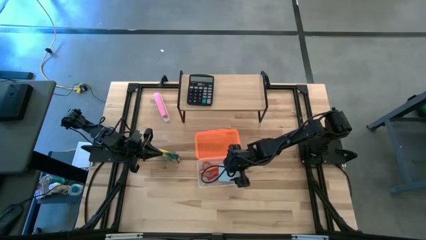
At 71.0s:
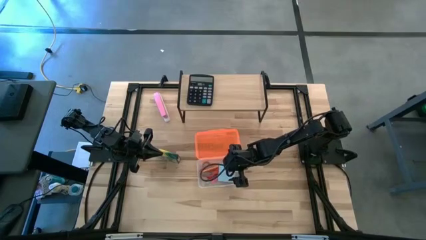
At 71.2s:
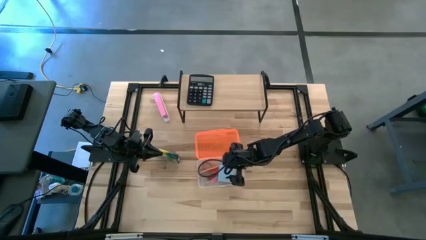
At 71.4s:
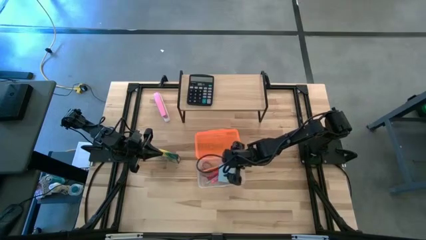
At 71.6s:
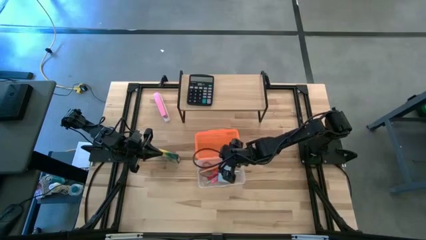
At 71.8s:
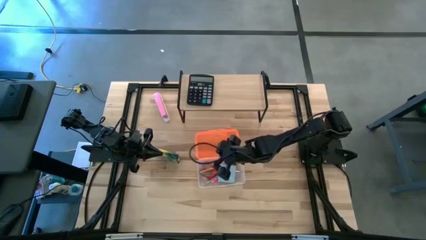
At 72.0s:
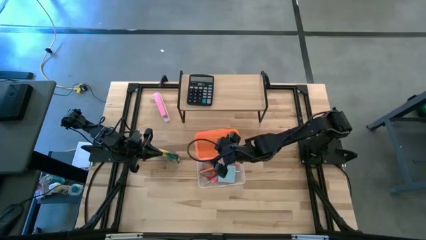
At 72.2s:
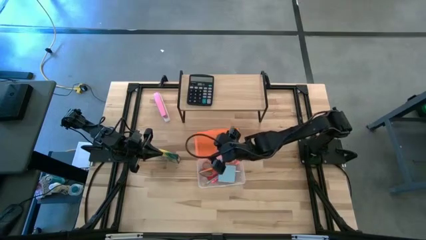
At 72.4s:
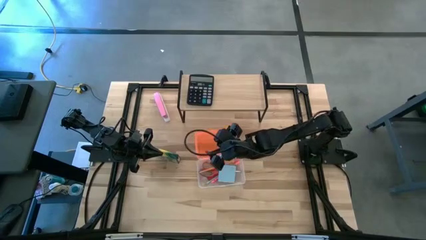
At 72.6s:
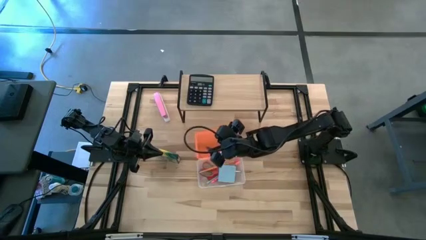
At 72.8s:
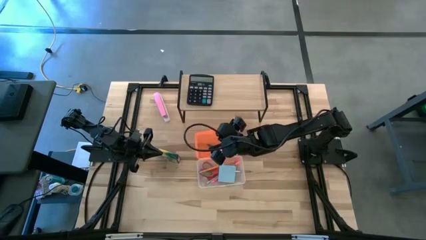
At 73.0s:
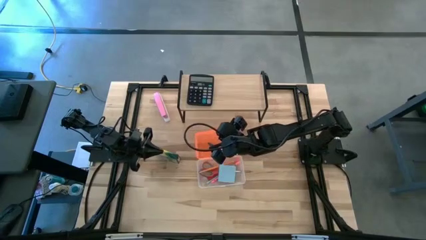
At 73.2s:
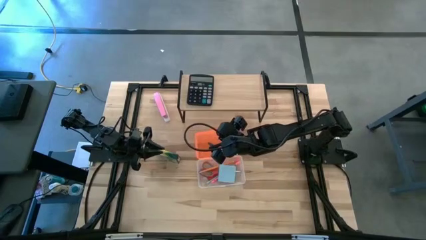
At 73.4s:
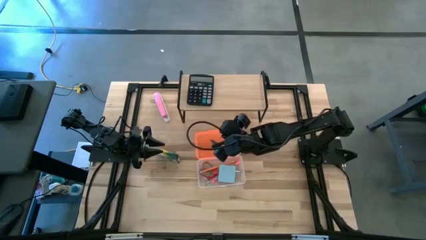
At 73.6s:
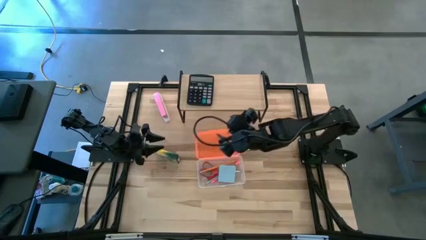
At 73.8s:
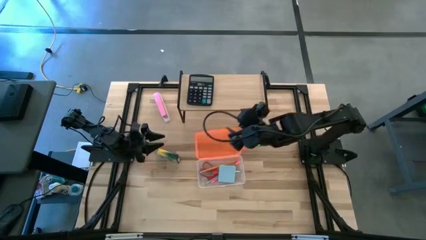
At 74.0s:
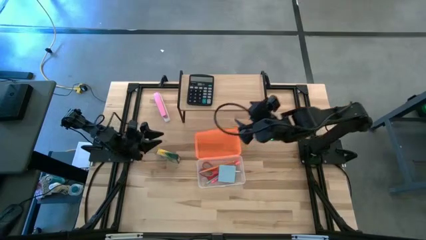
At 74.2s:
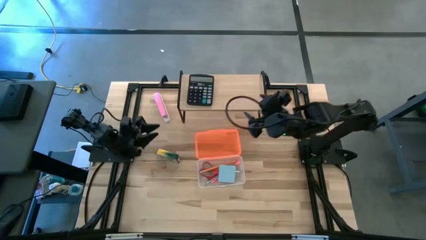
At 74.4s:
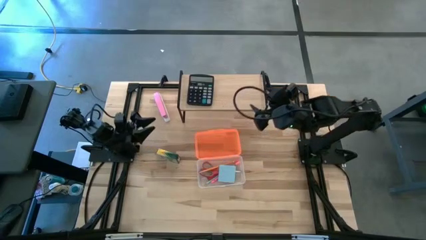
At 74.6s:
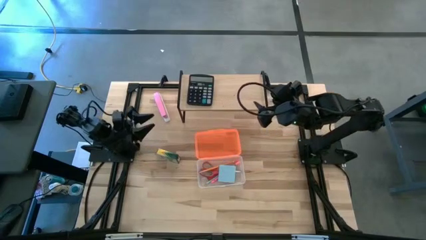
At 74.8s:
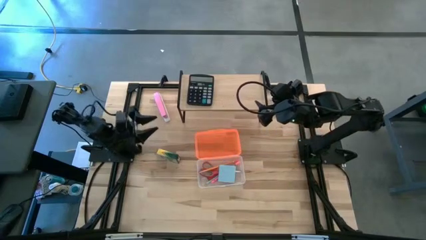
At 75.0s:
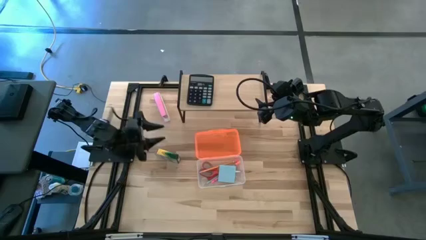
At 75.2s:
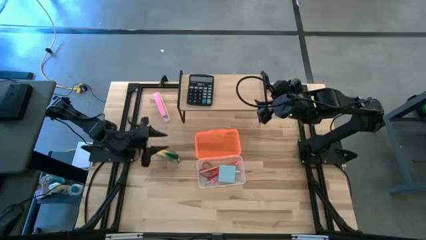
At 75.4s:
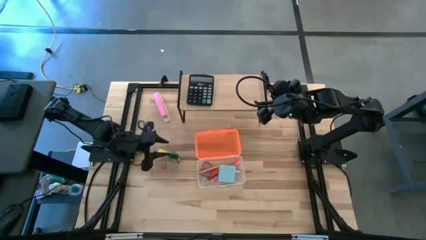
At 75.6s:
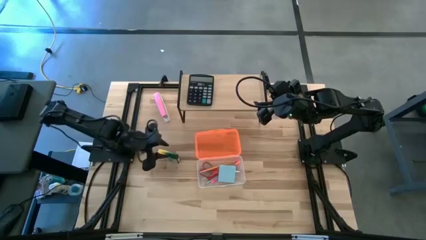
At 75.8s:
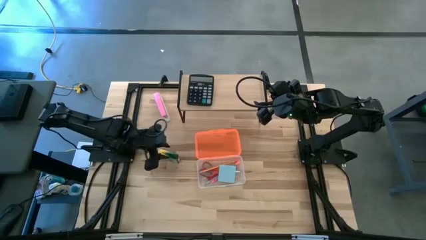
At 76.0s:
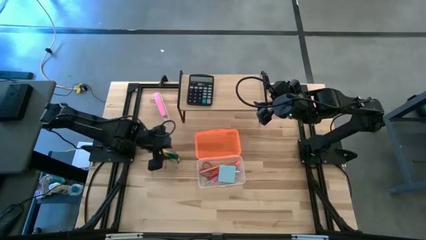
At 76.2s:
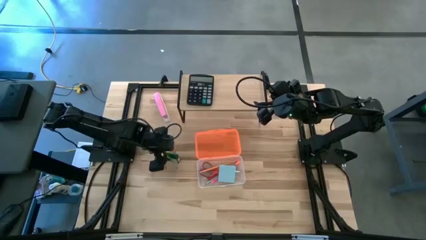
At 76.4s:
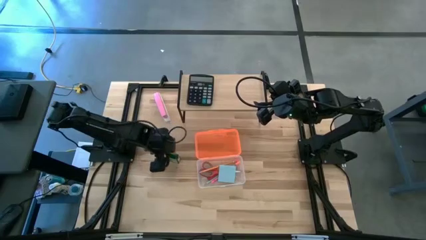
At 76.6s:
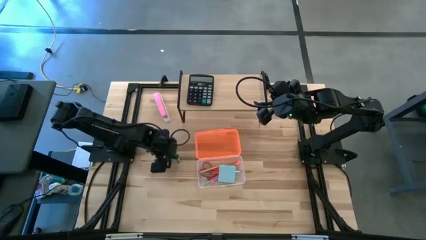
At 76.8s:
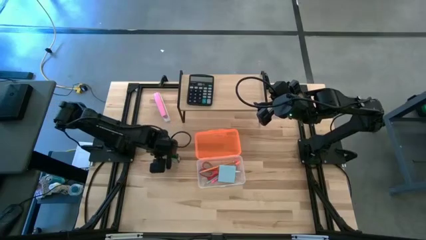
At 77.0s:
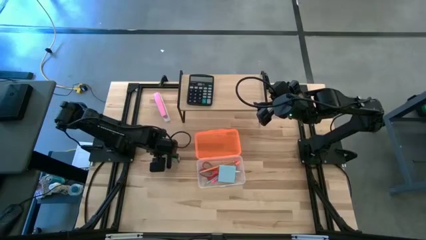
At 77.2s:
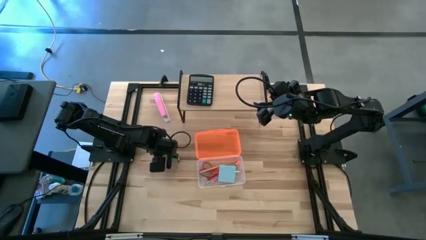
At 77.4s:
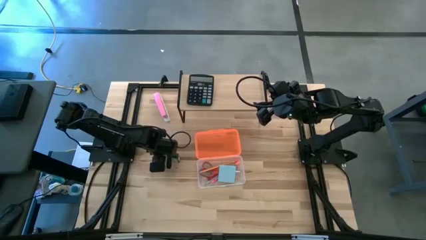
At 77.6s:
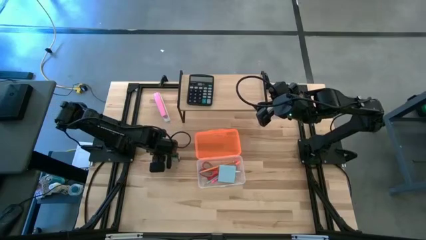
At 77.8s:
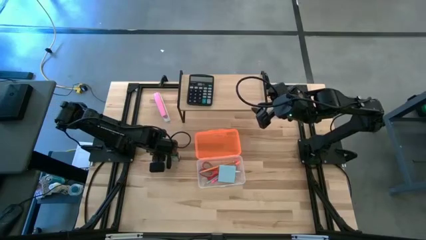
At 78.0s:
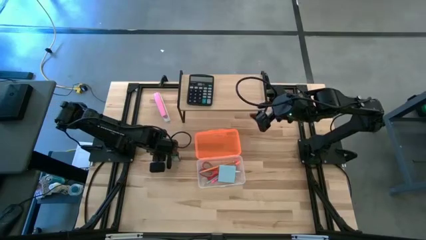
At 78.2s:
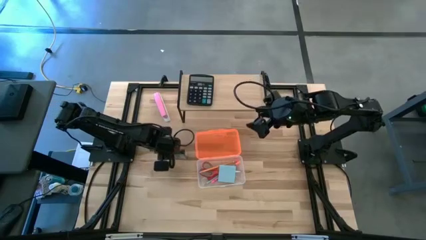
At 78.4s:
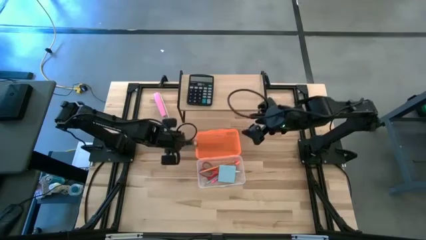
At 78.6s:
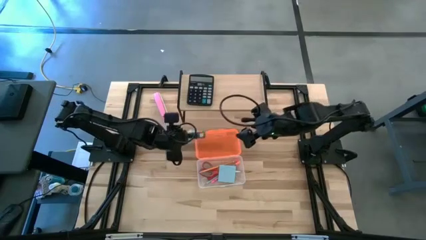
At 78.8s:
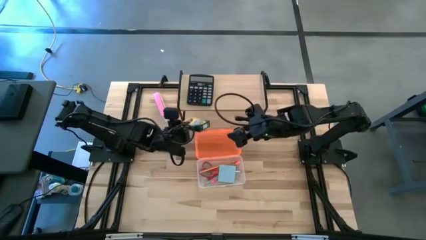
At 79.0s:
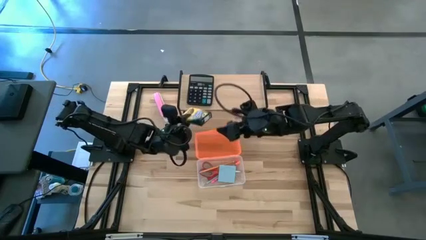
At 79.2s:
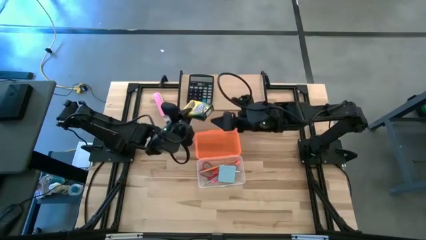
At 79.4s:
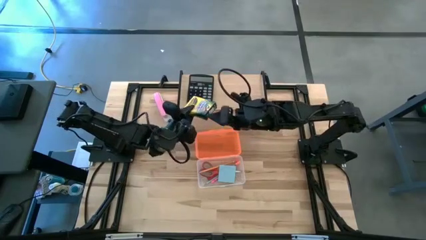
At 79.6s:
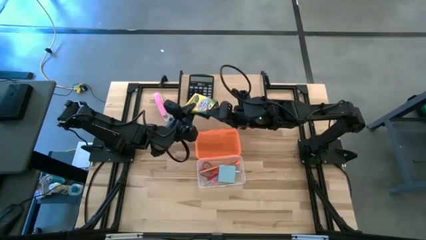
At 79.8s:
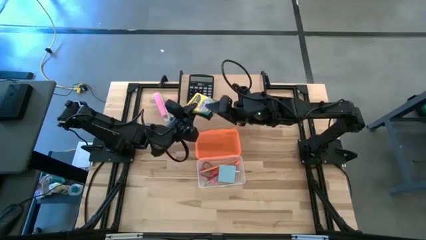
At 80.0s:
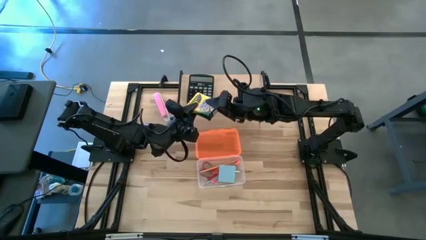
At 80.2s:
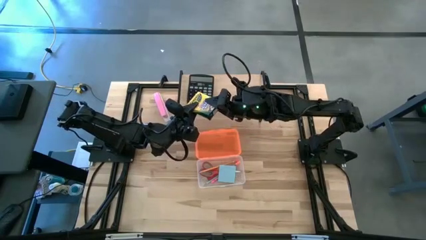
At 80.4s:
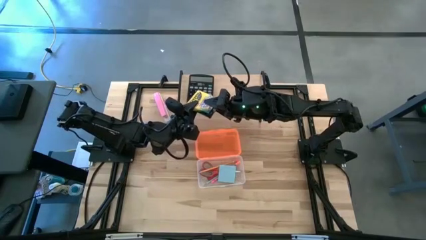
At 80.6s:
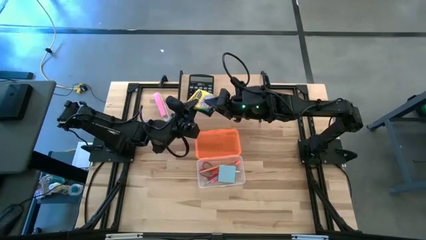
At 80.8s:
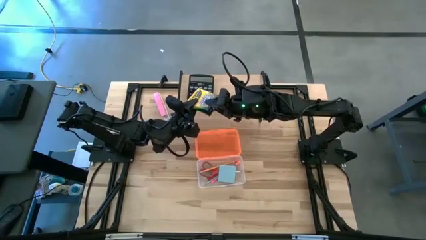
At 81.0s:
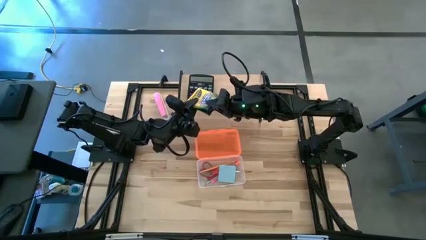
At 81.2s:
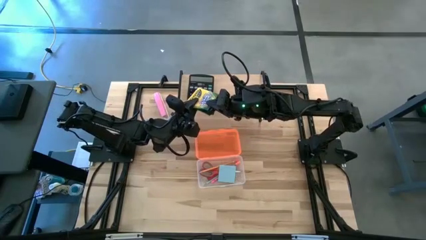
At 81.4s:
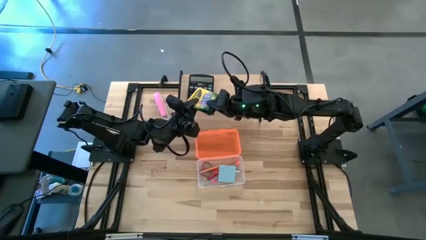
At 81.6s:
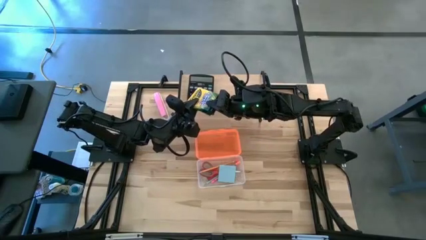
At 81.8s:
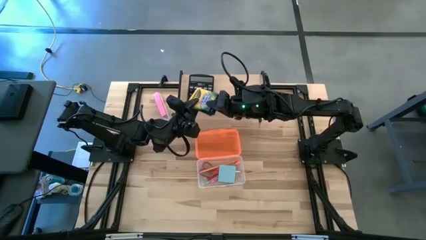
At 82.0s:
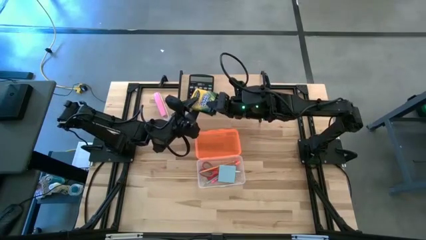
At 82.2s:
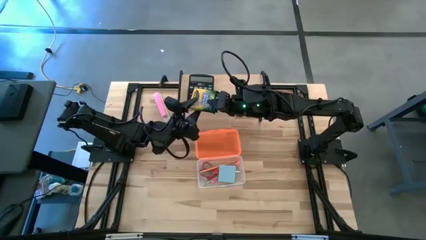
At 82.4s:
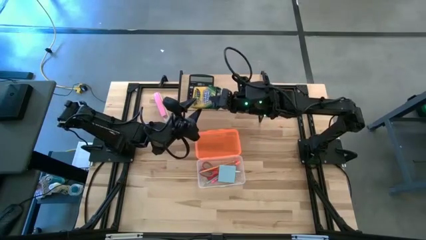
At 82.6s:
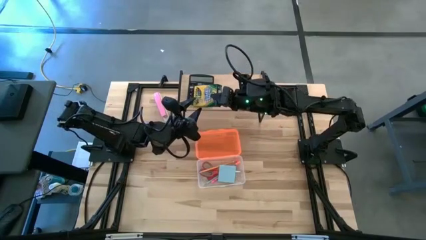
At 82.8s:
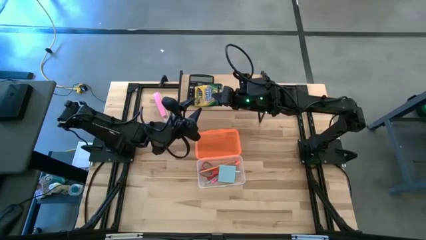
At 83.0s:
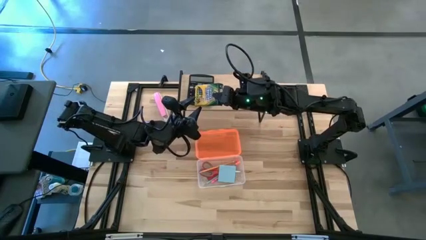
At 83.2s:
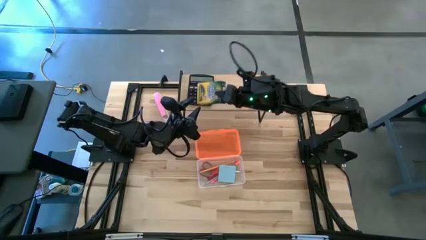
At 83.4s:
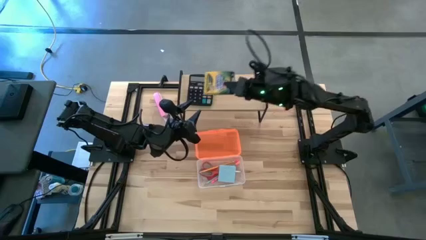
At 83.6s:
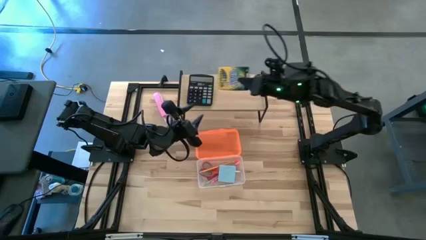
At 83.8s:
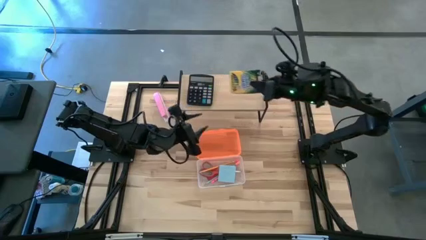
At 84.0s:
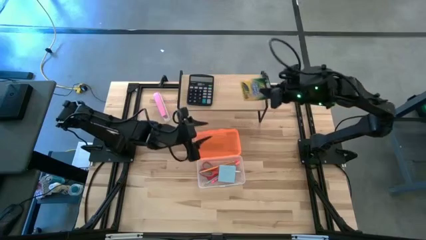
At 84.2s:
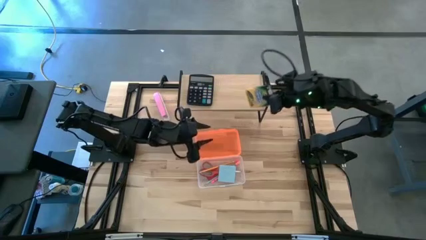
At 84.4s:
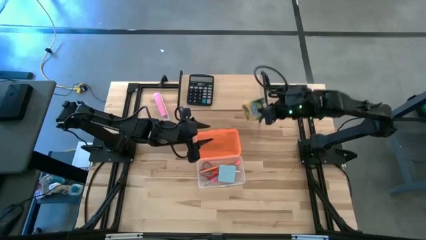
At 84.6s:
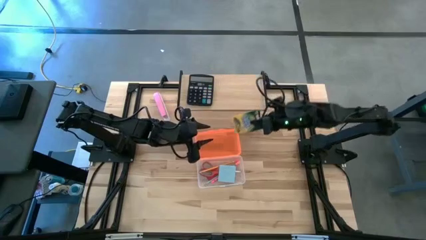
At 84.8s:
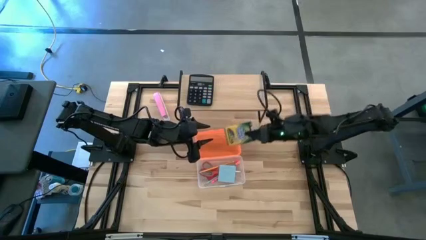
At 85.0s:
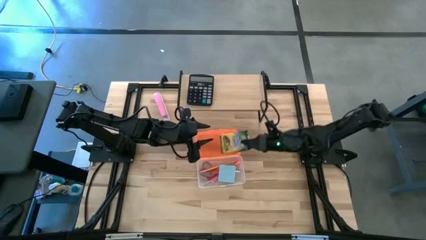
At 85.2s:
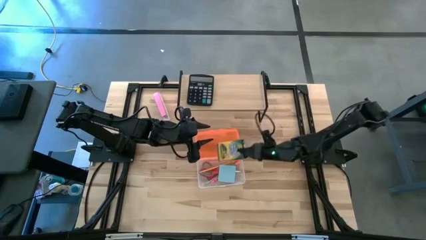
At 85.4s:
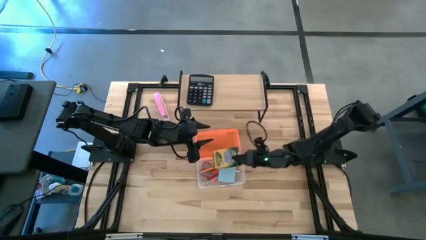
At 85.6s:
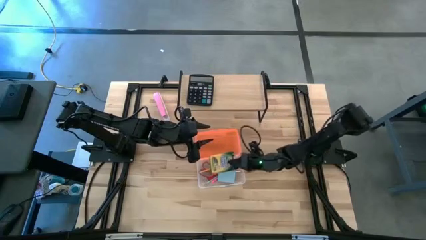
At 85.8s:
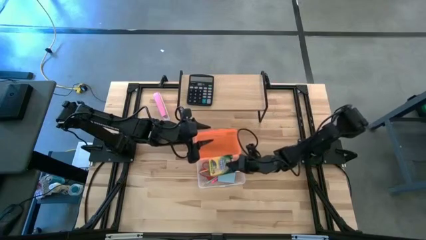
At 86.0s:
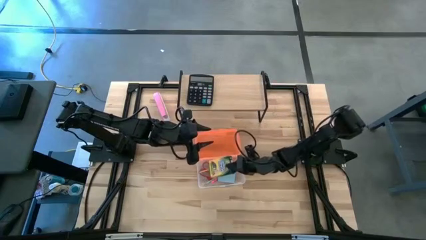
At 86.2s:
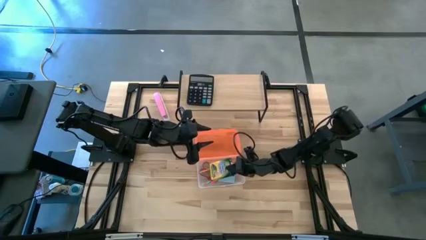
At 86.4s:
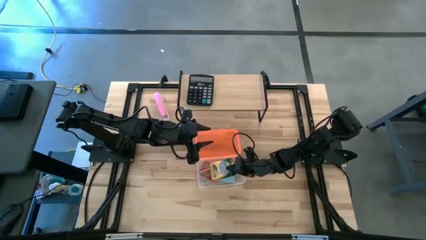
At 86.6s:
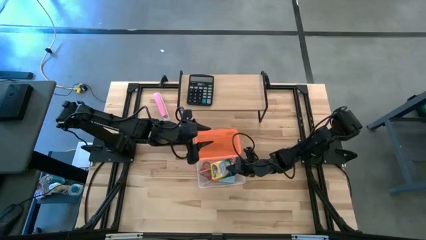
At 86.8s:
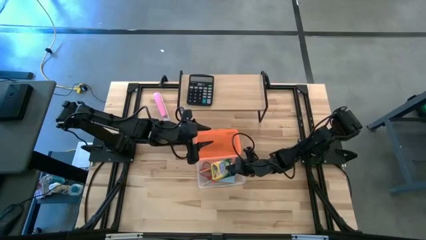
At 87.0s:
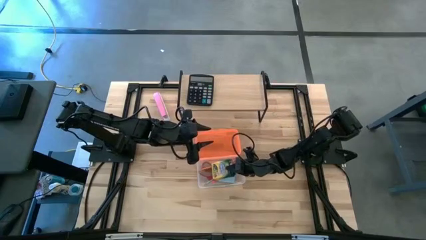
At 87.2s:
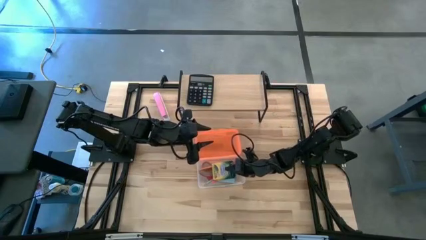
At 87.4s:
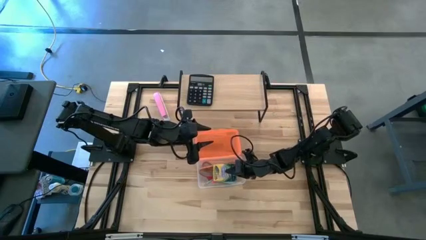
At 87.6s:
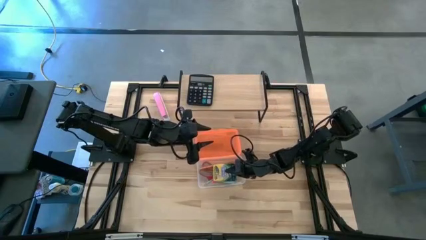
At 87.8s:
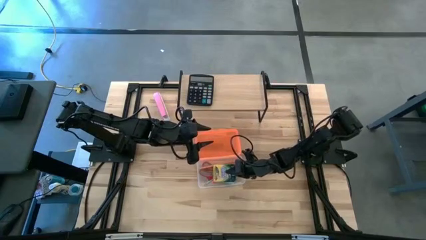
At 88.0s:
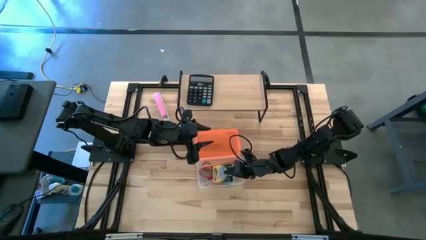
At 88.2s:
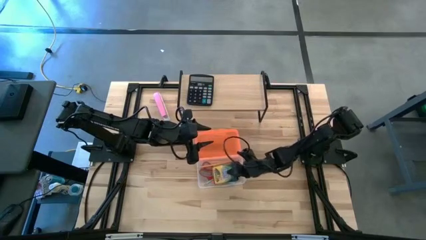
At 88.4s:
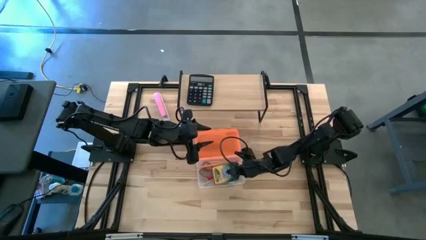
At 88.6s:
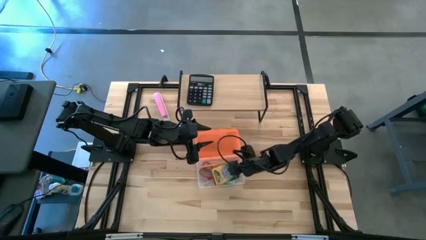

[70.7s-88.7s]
Task: Pack school essentials
Put the crayon box into the orange supply box
